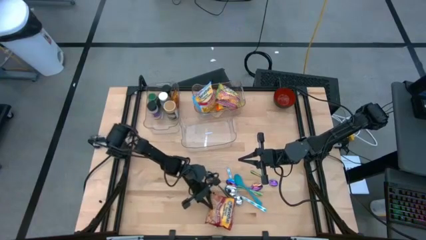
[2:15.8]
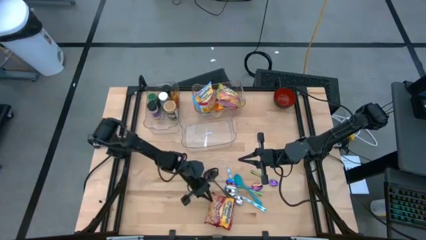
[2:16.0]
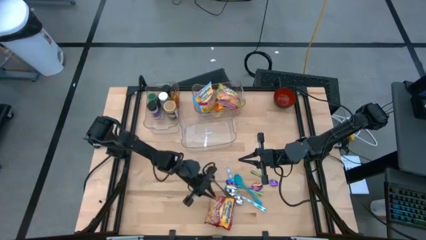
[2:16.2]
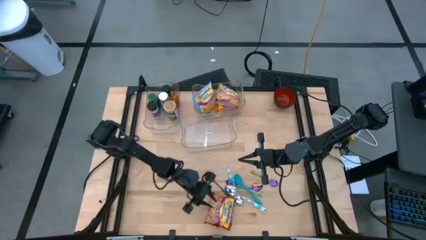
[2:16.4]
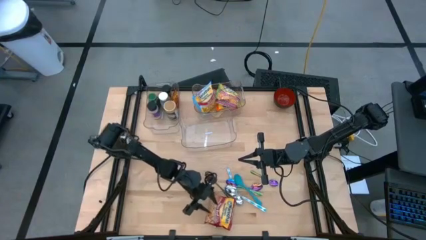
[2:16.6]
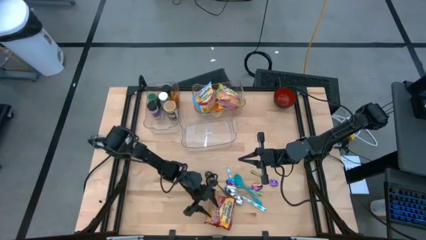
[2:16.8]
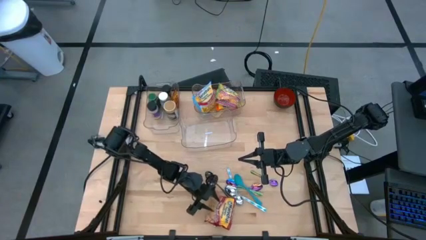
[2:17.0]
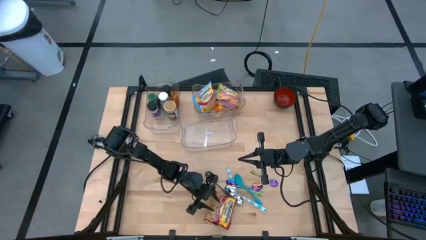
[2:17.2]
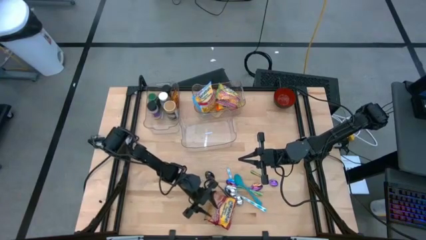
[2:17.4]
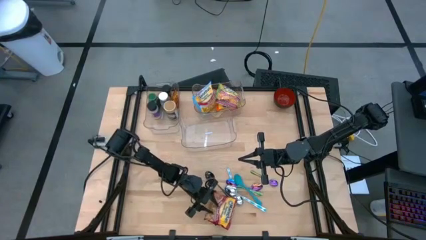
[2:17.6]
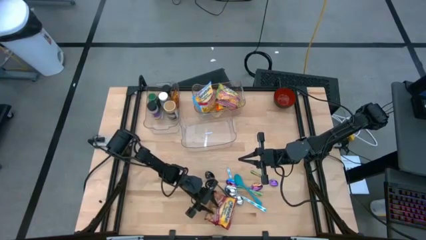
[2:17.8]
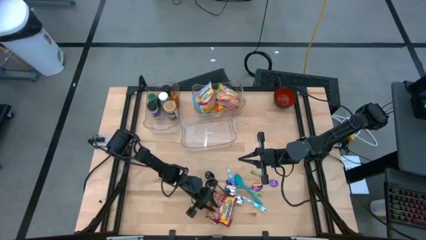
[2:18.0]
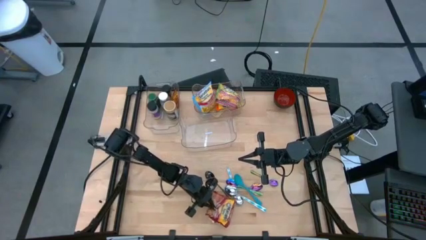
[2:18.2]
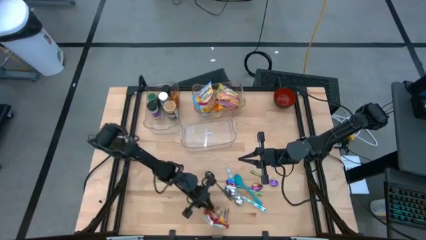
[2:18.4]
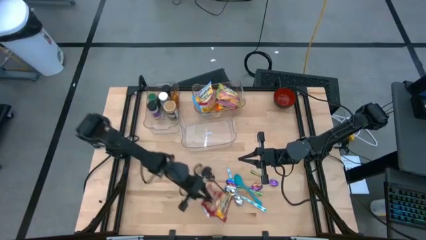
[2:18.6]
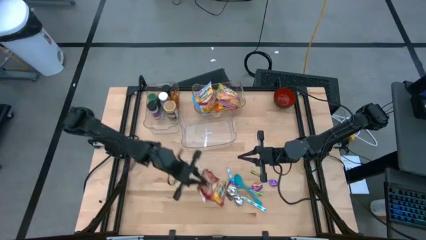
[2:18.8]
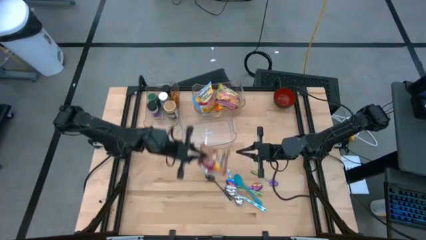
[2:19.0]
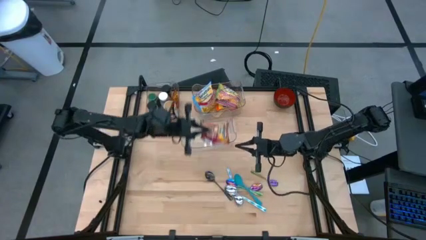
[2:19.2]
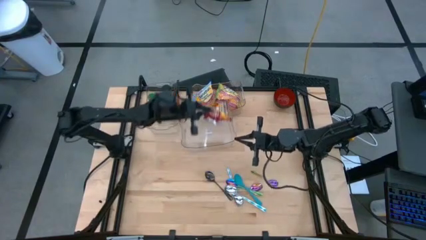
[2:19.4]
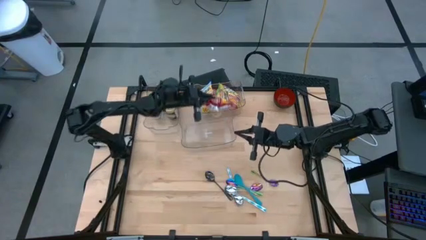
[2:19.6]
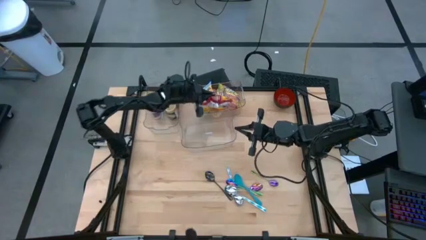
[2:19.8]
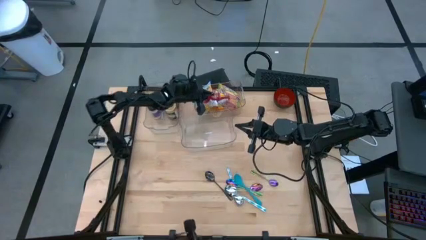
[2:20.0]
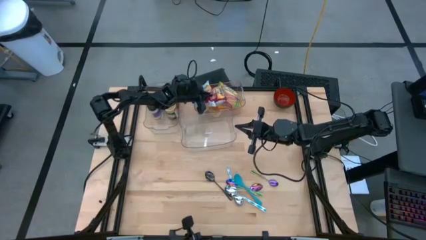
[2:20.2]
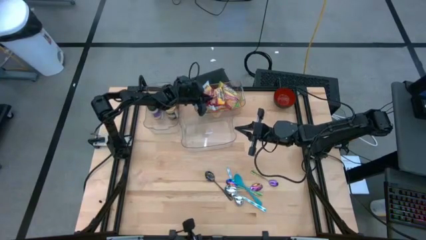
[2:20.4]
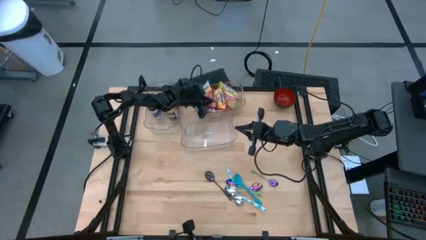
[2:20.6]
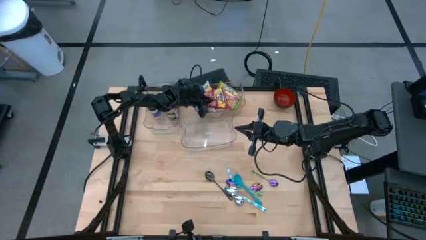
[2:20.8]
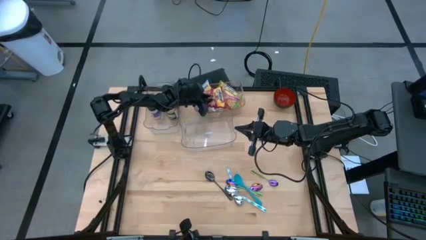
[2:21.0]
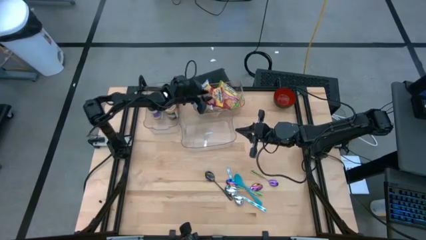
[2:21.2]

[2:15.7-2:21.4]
Task: Pick & Place Food Item
Put the red noodle pack into the top right transparent bin

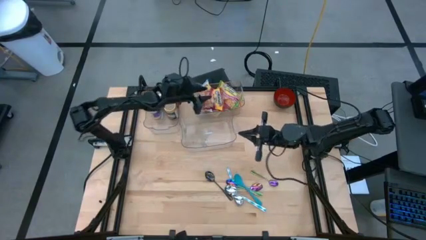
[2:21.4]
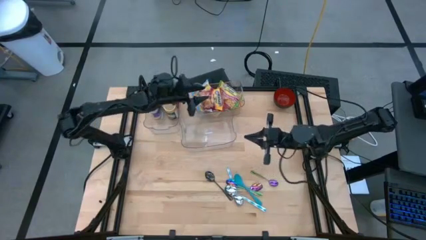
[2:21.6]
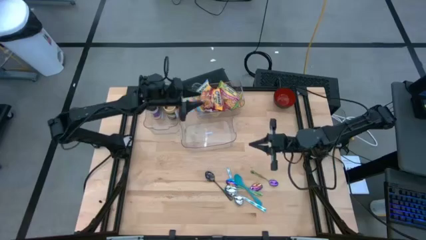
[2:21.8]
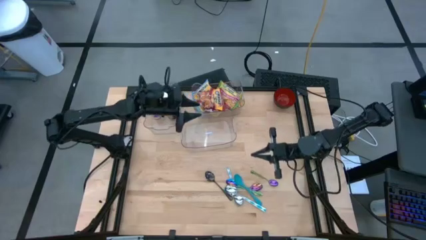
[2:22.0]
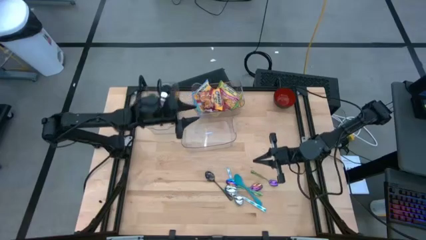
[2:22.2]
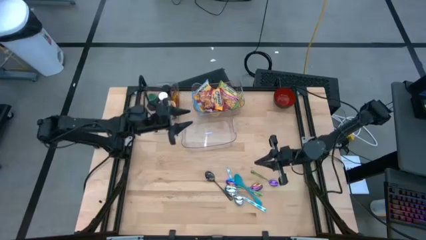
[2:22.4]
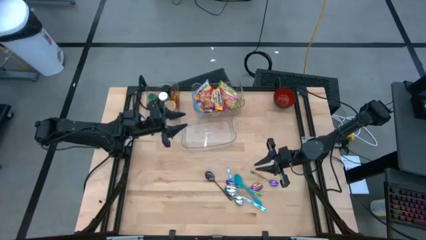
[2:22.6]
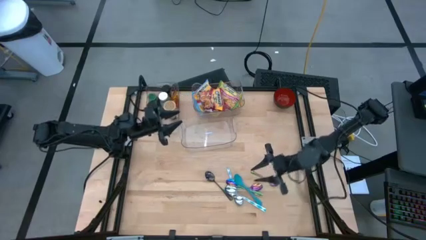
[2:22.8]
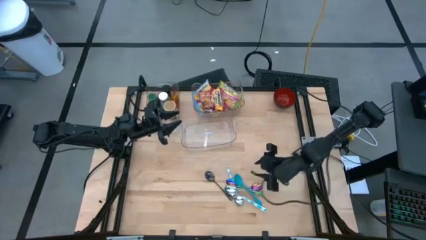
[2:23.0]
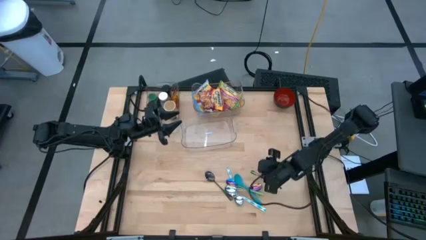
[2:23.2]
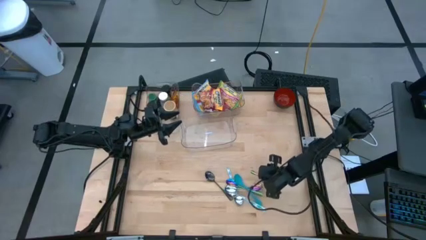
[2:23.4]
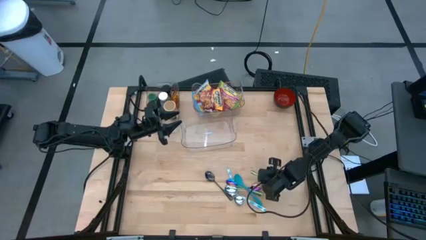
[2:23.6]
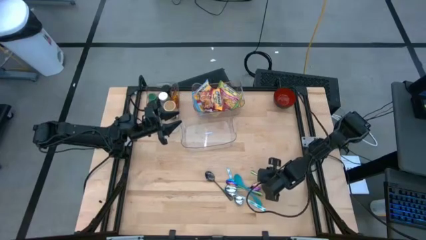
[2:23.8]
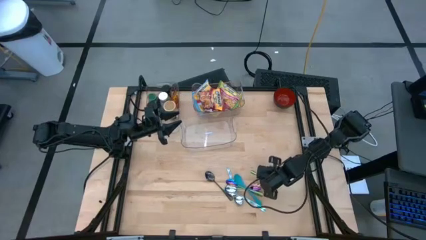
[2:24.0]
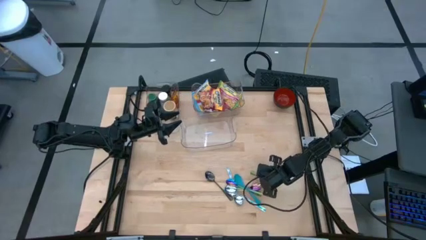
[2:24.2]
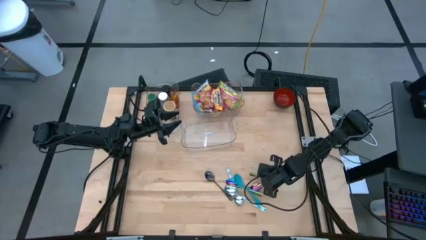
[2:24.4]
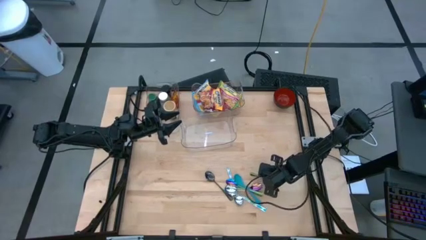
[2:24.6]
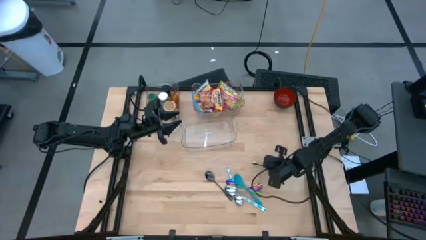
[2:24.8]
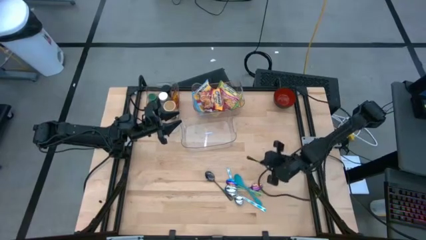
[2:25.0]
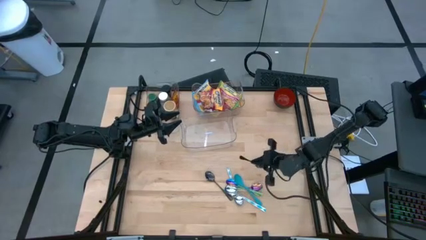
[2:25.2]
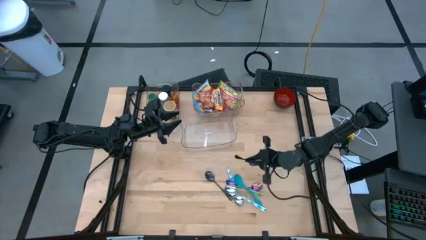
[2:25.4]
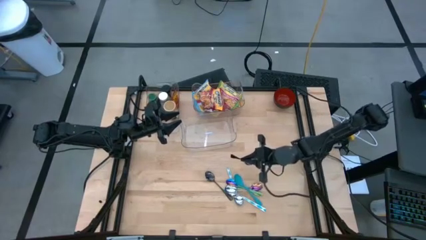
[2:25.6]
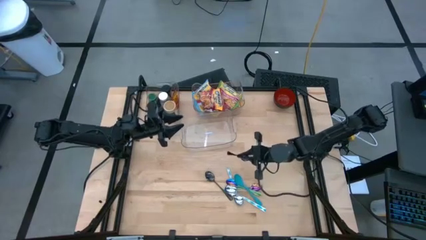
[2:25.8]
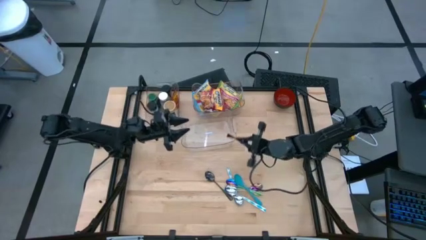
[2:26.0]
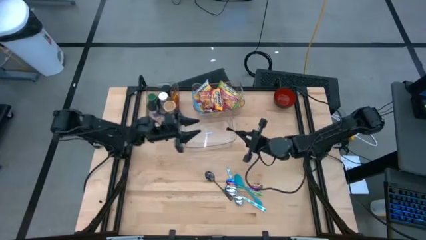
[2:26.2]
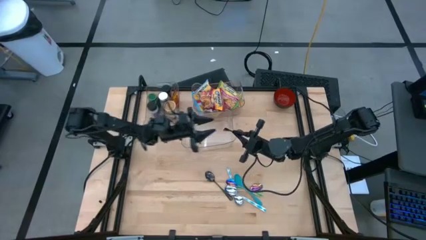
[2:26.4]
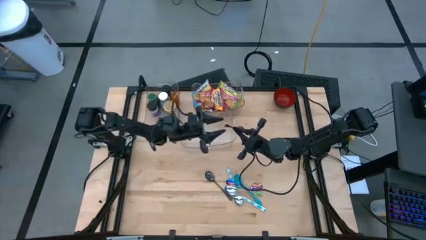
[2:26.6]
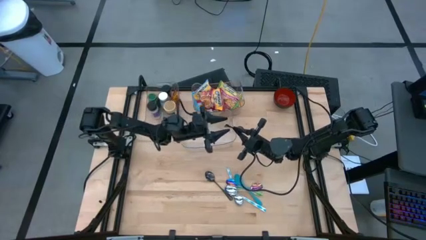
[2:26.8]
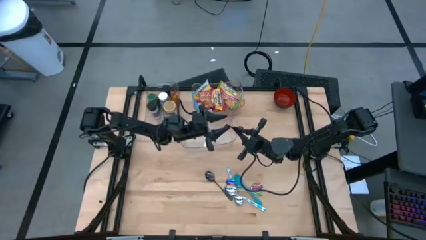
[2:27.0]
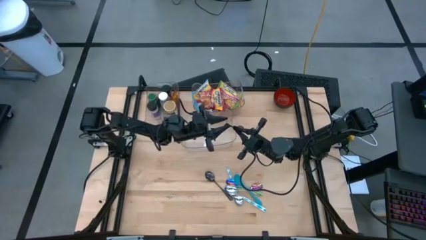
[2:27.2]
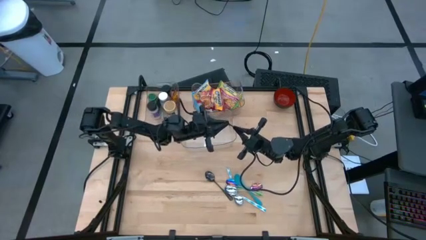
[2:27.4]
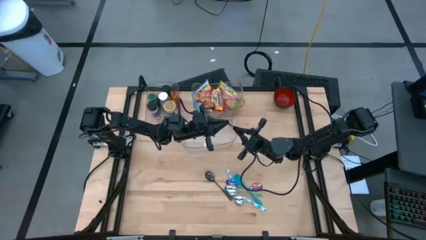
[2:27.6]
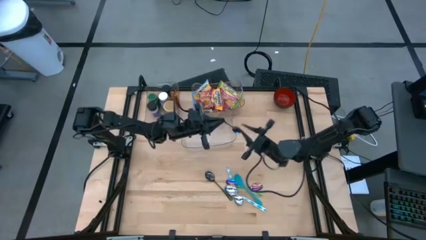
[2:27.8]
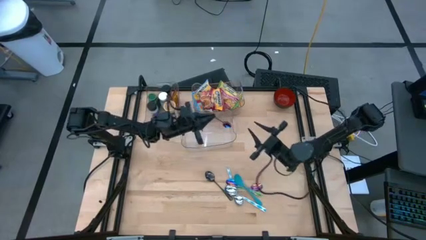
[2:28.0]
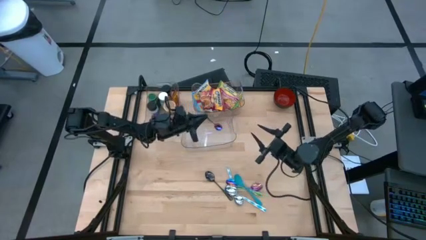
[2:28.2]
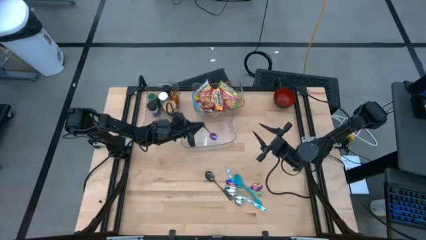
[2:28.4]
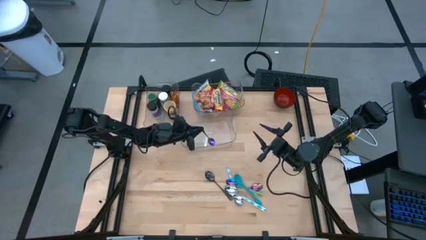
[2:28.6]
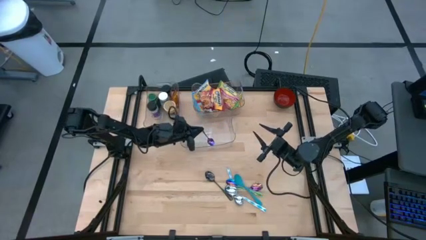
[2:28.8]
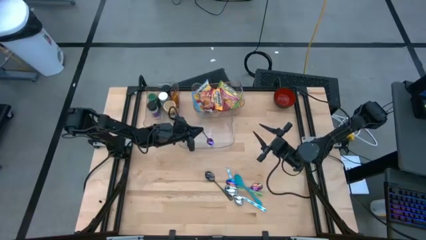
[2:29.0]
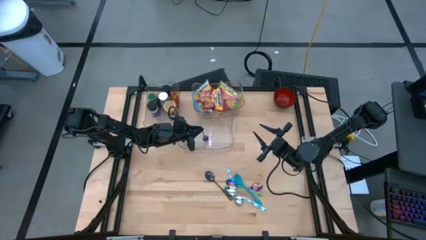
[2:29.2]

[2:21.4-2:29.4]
Put the right purple spoon into the bottom transparent bin
